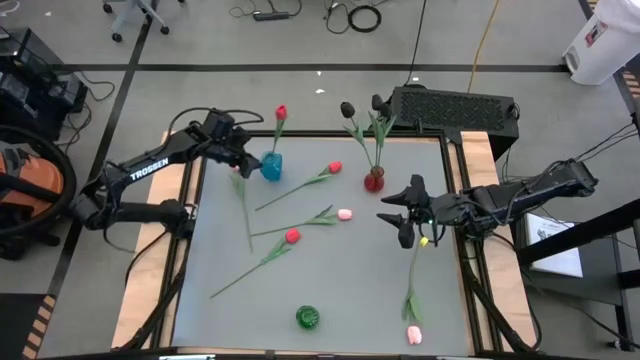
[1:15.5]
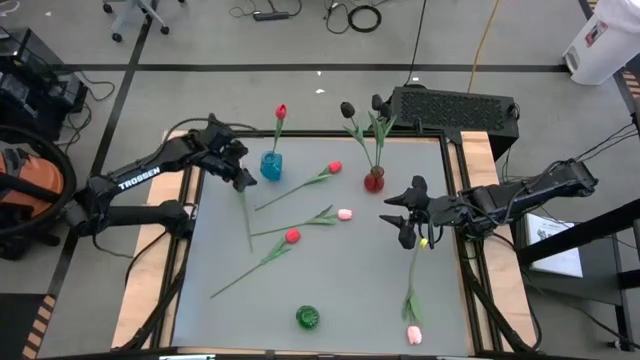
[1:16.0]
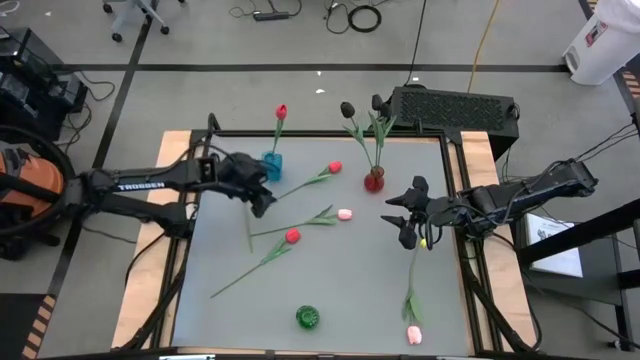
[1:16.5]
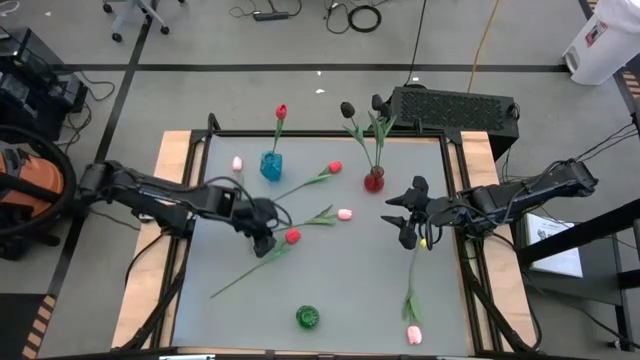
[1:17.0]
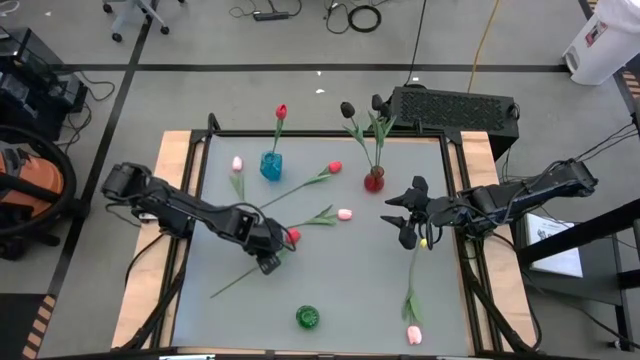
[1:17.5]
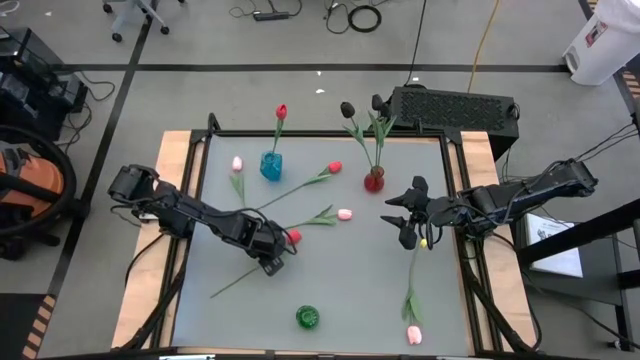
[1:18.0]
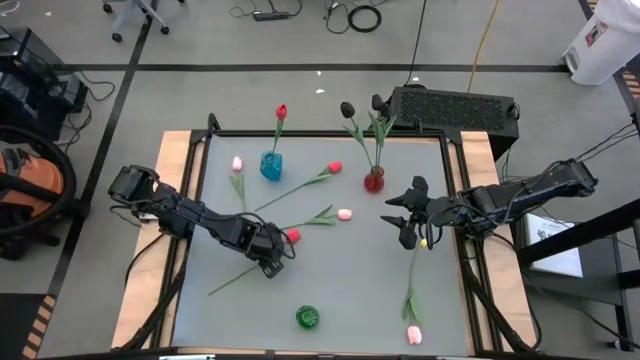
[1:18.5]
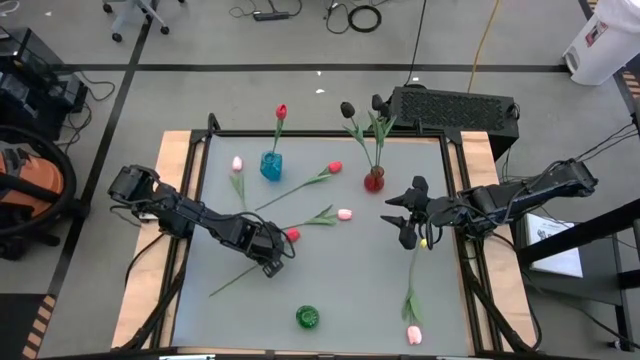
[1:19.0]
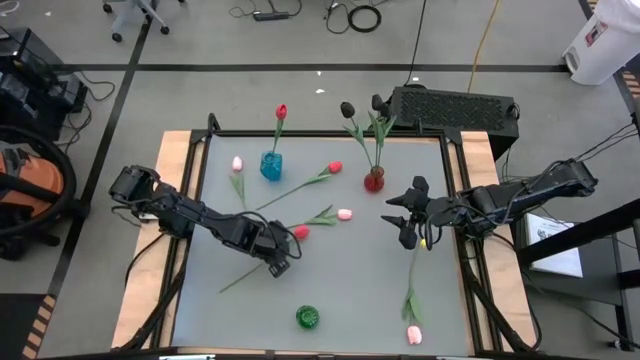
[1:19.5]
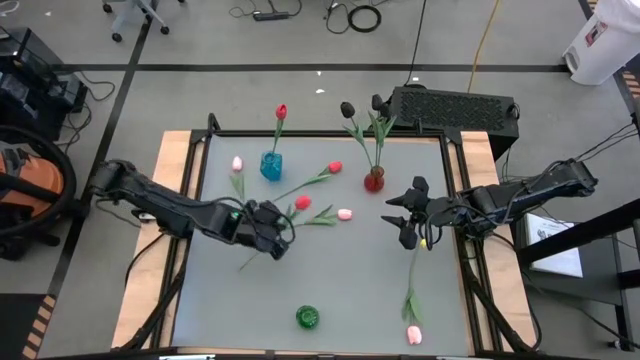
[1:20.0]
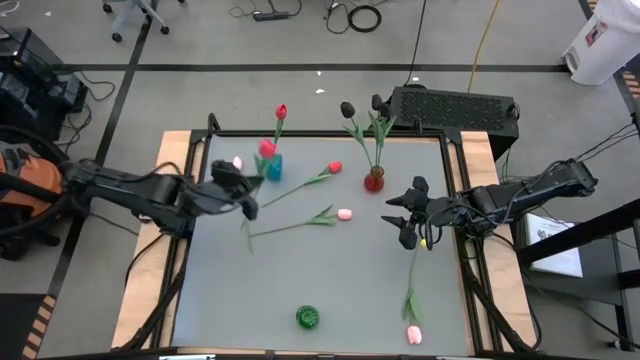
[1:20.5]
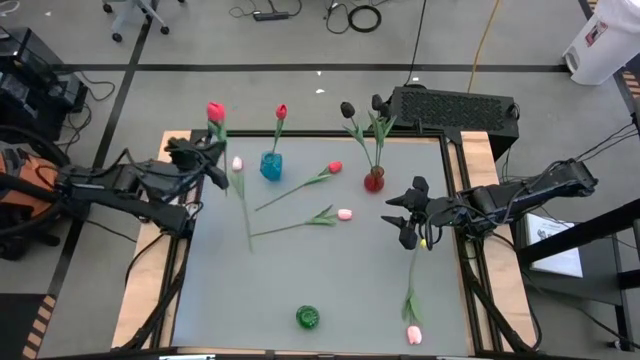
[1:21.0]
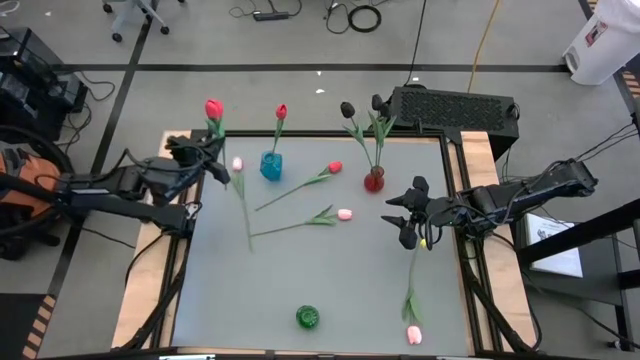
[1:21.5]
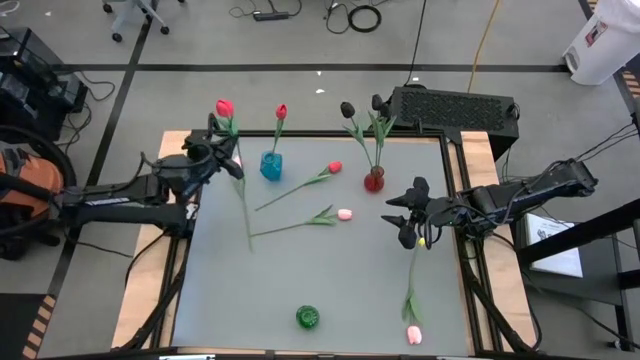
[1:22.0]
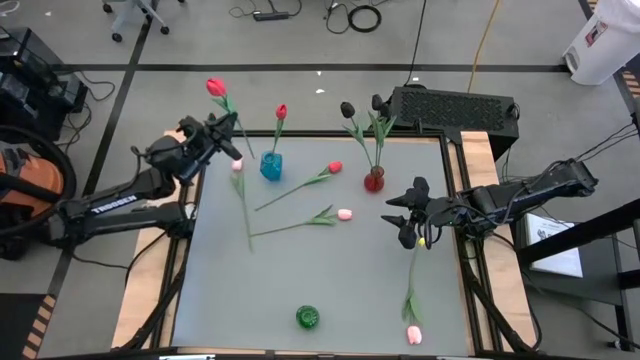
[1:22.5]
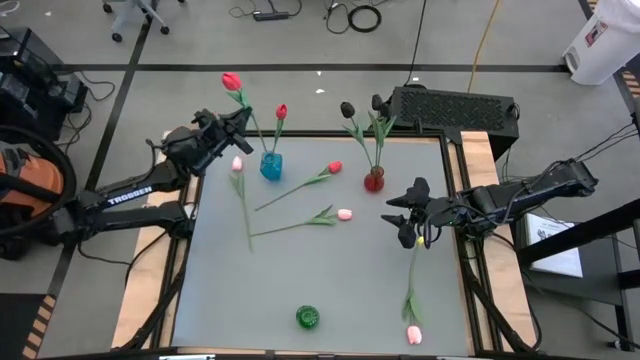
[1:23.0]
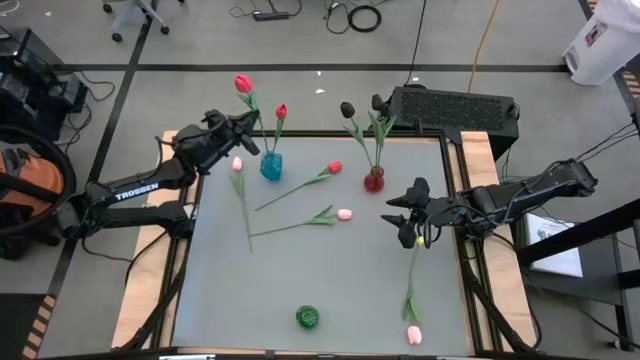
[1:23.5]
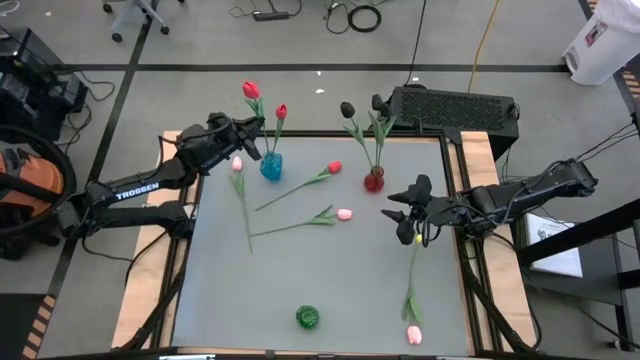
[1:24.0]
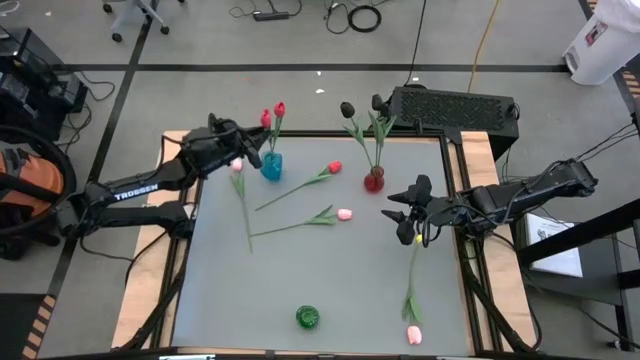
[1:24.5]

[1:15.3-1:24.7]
Task: Sort flowers into vase by color
Put the bottom orange tulip into the blue vase

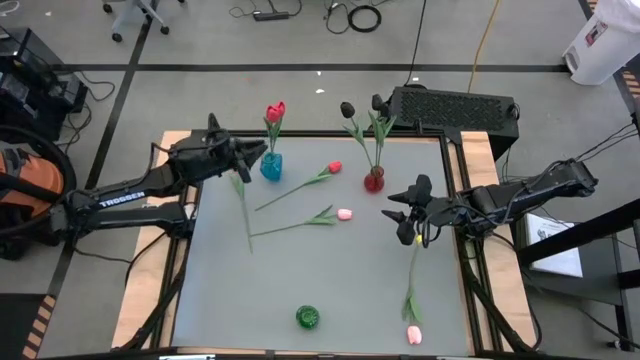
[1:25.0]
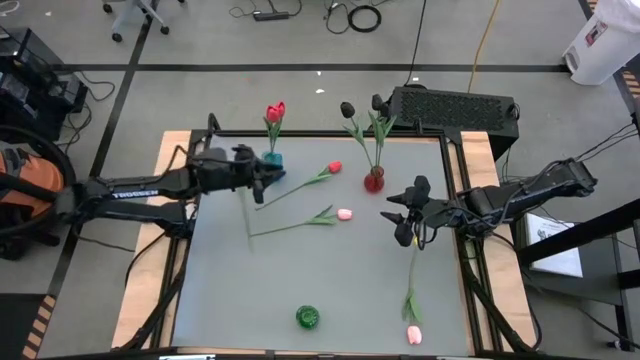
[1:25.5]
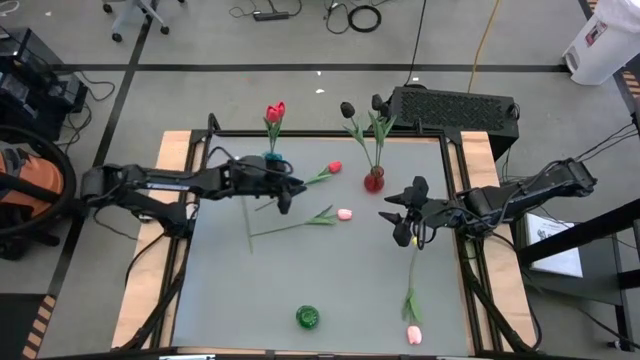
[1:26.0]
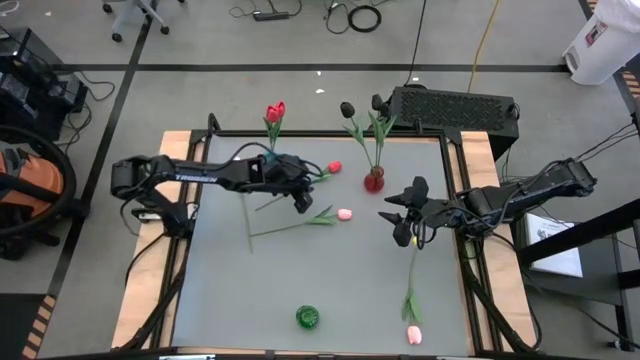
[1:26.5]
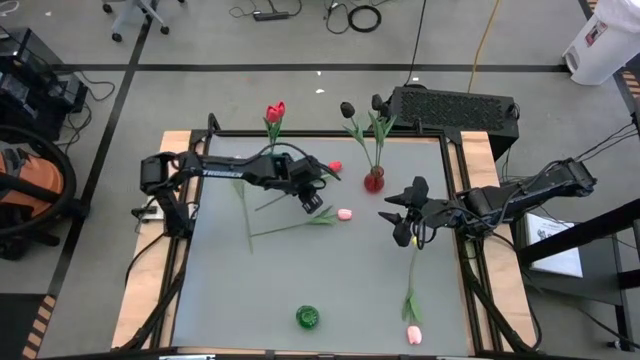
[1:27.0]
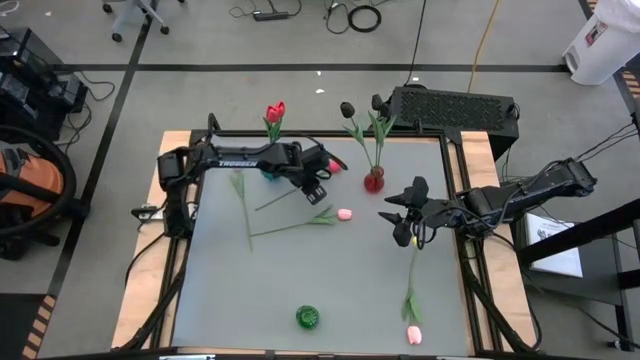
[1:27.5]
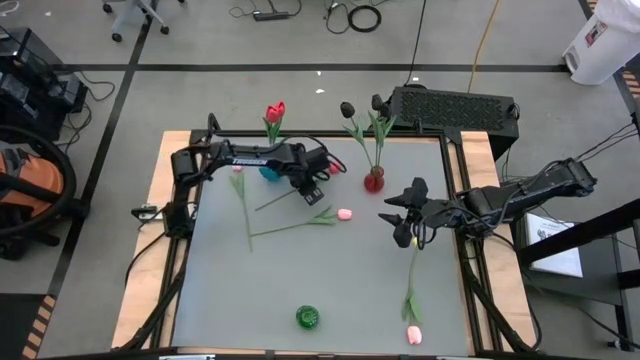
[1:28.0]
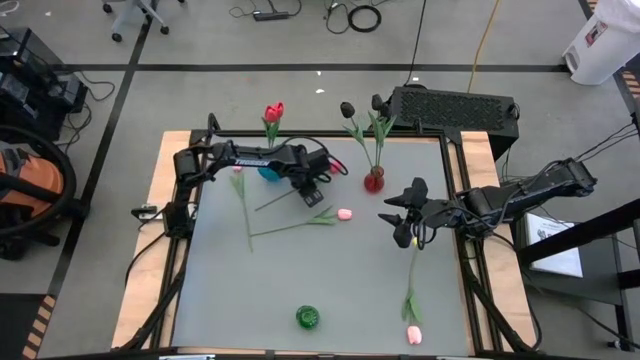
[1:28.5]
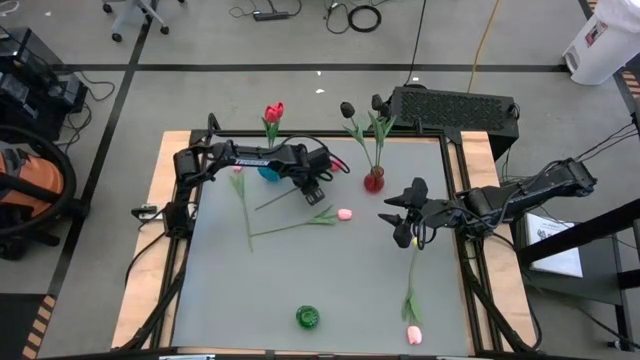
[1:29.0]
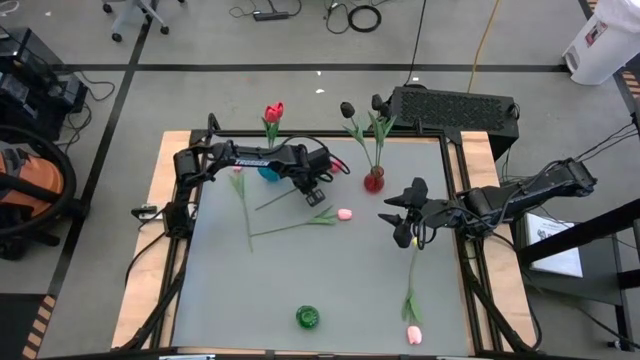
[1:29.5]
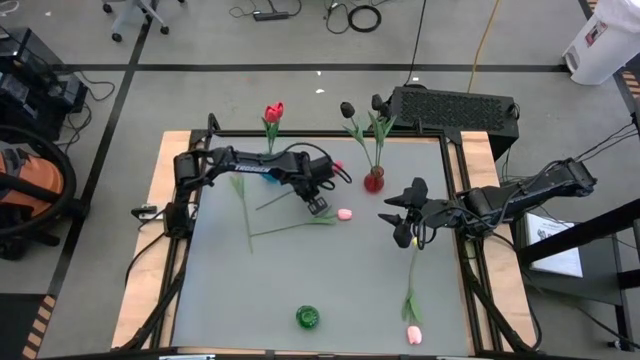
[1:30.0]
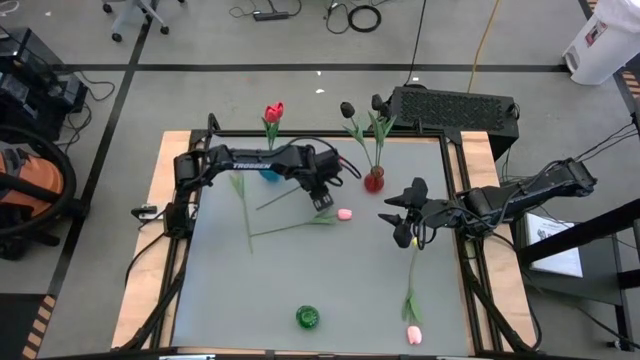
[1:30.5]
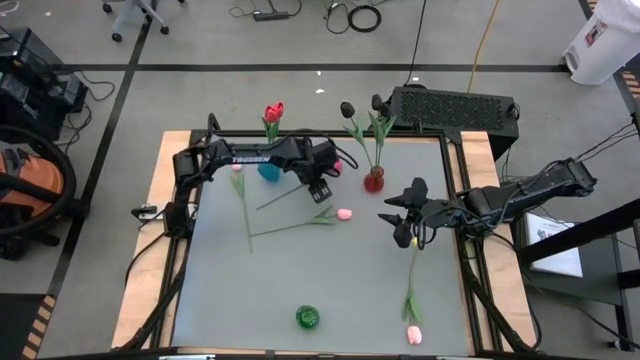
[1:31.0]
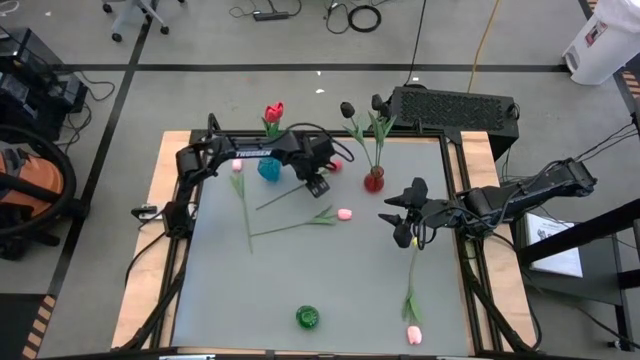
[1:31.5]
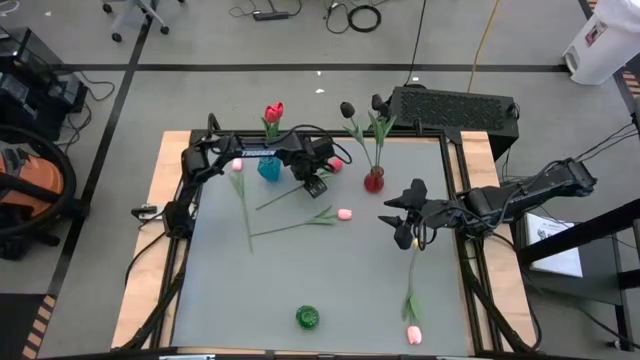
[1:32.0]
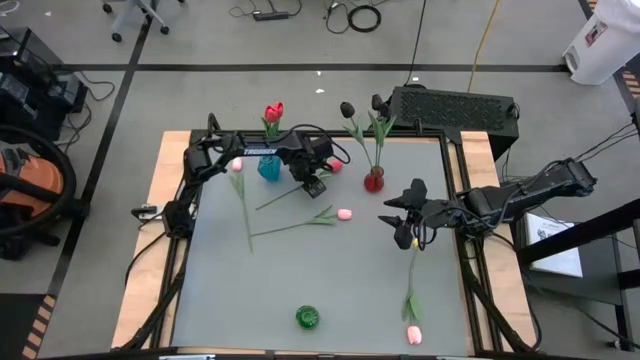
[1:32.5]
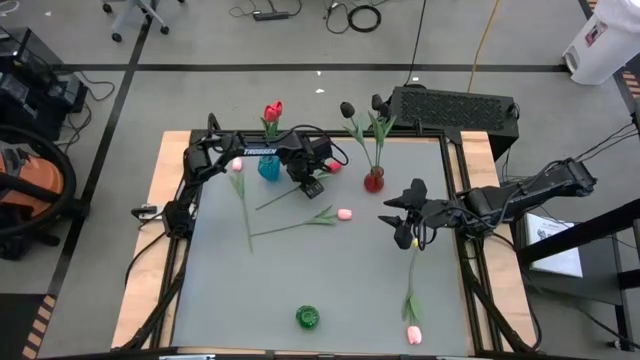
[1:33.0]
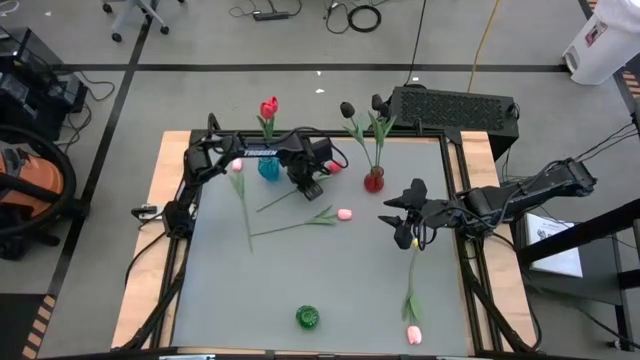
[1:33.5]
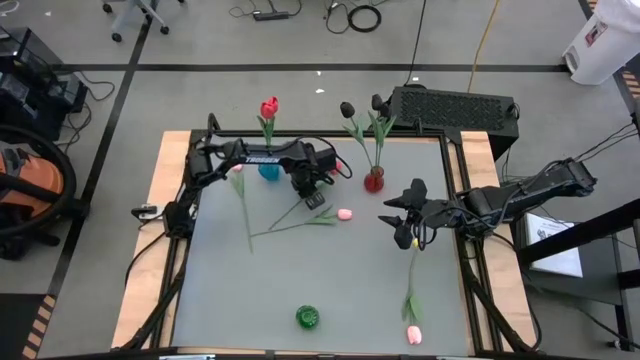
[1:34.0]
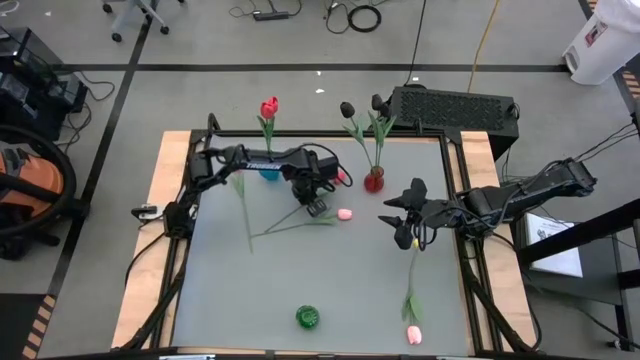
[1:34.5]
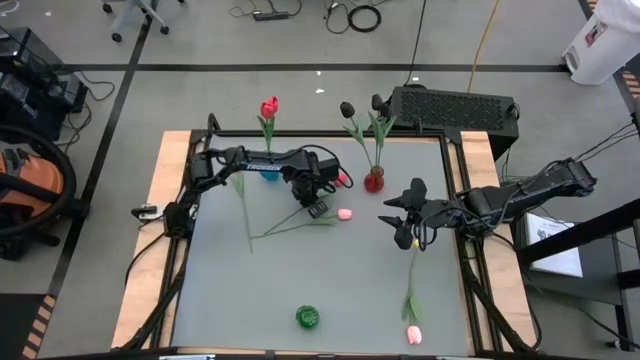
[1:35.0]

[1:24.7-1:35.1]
Put the orange tulip into the blue vase

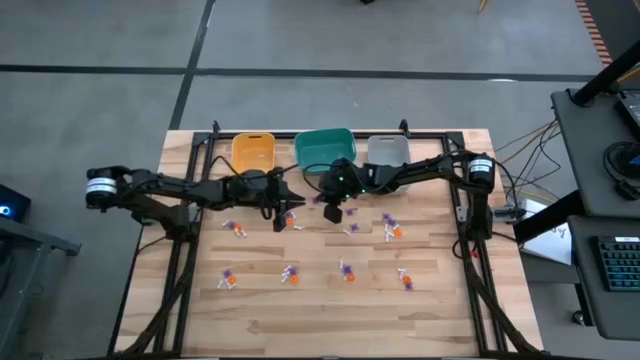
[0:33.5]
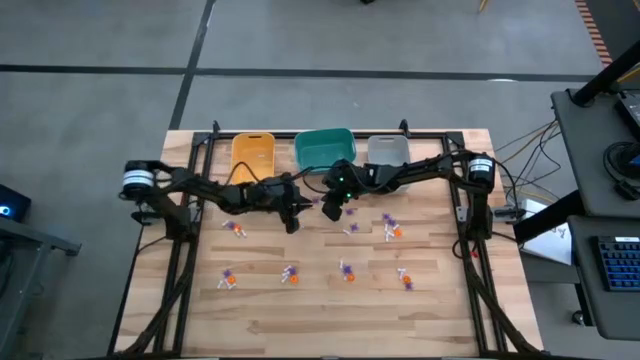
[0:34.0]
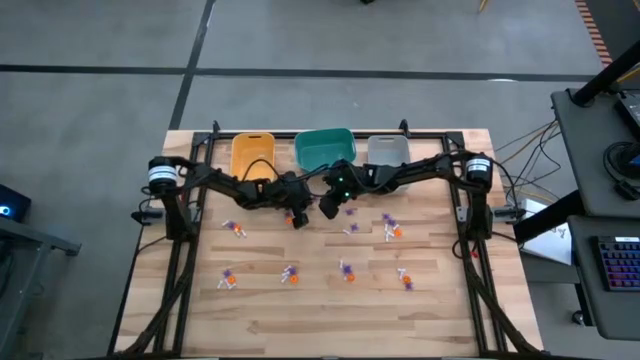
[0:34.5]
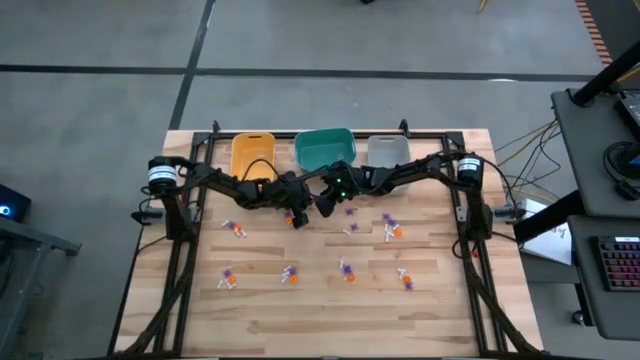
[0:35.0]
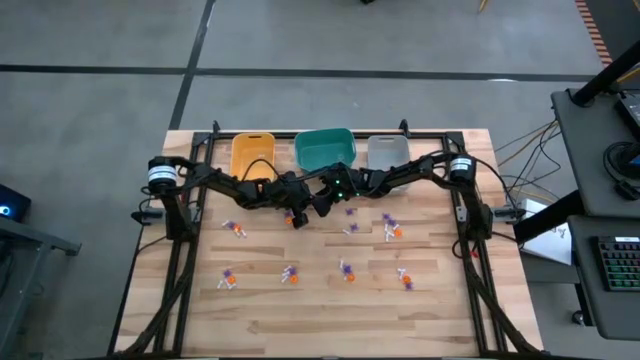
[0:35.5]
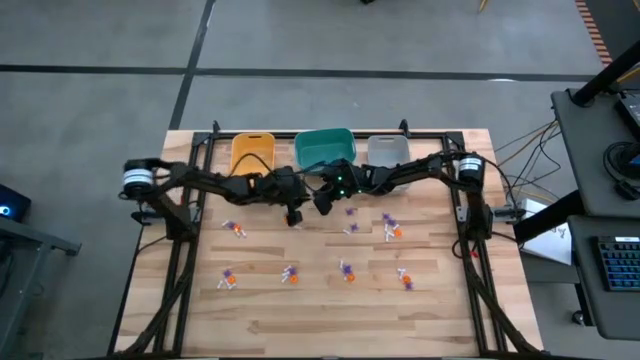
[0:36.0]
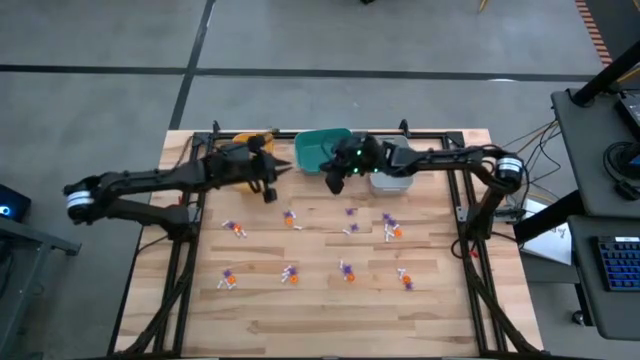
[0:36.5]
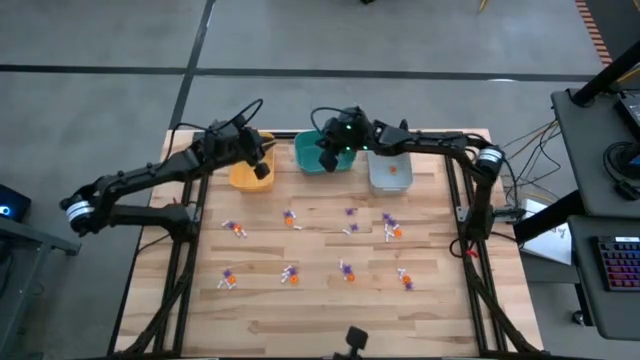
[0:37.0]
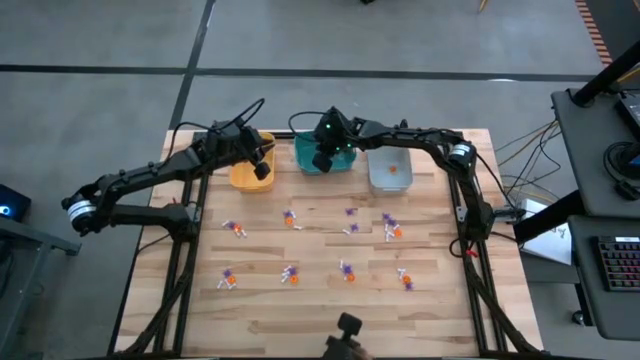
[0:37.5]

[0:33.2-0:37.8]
Task: Sort Halloween decoration
Put the violet spider toy into the green bin
